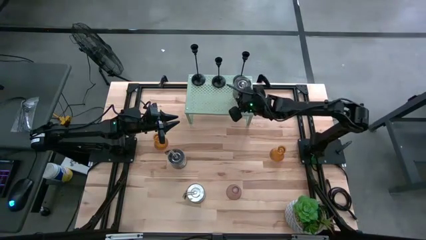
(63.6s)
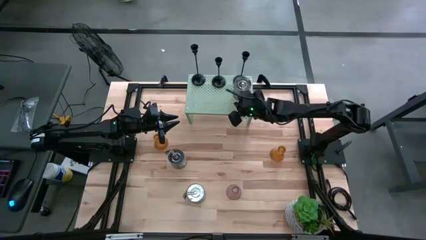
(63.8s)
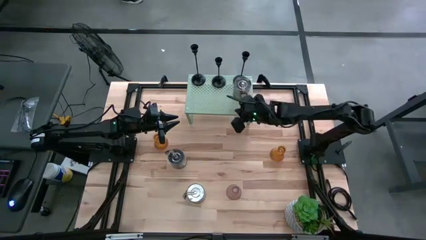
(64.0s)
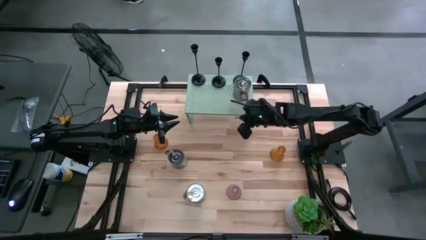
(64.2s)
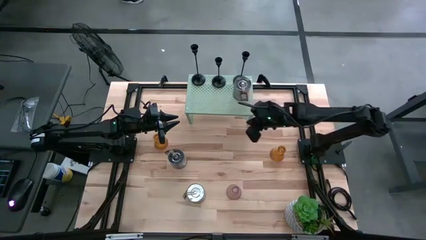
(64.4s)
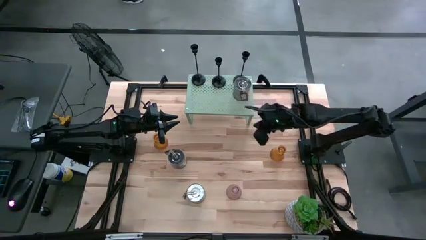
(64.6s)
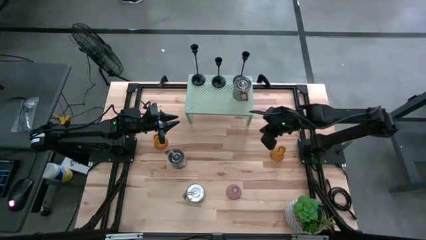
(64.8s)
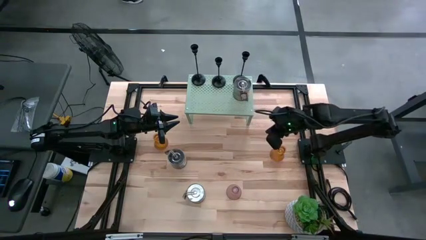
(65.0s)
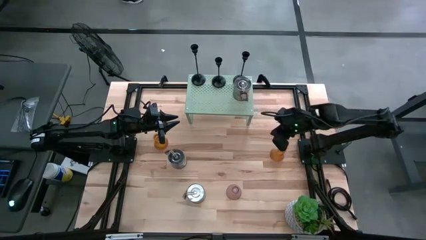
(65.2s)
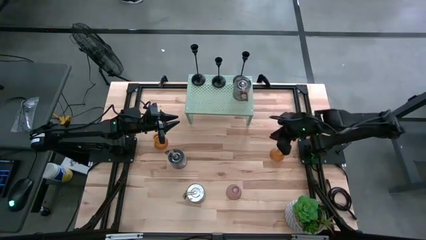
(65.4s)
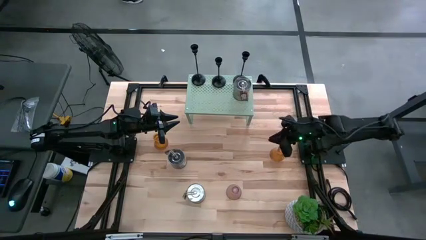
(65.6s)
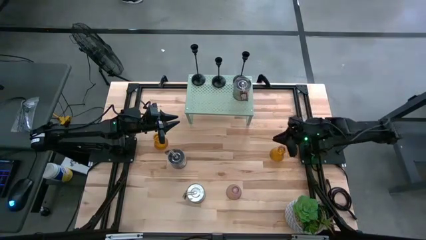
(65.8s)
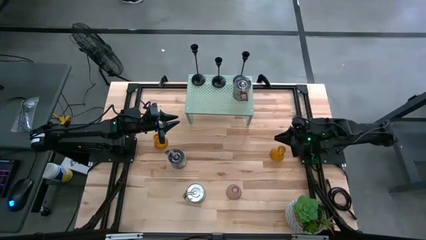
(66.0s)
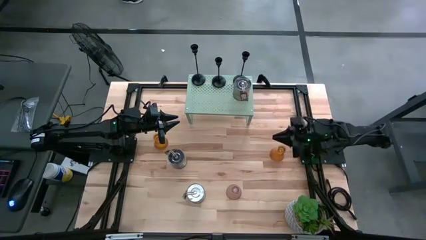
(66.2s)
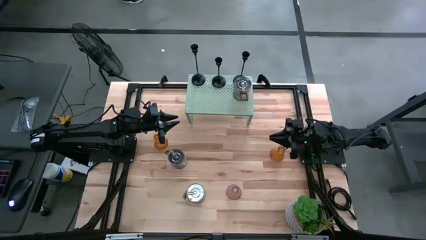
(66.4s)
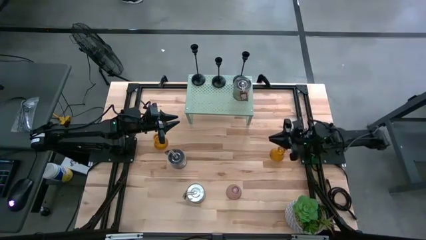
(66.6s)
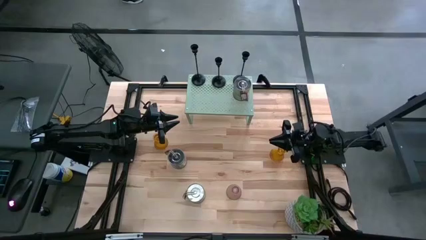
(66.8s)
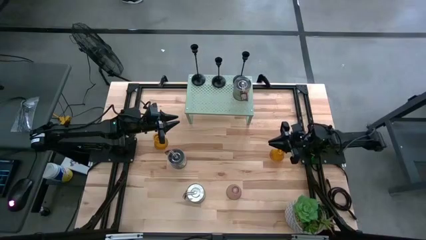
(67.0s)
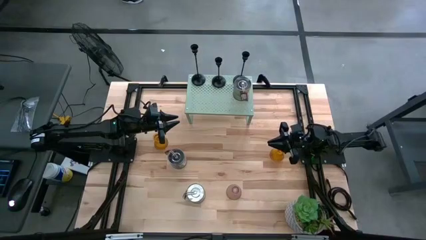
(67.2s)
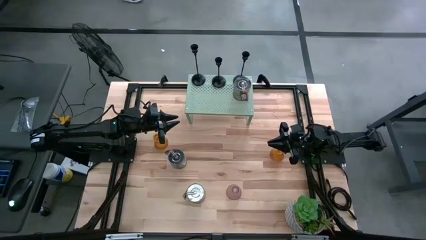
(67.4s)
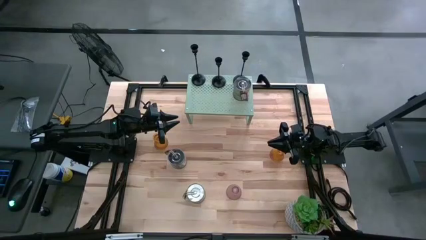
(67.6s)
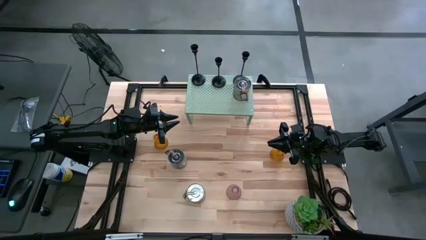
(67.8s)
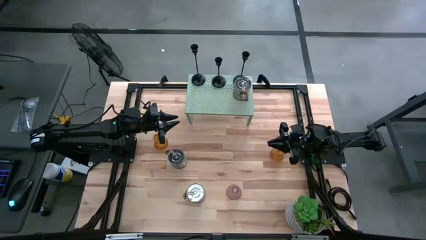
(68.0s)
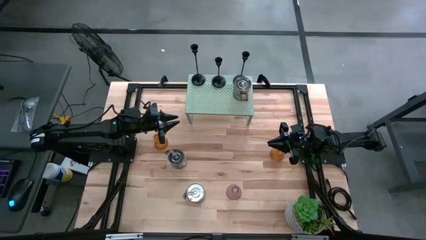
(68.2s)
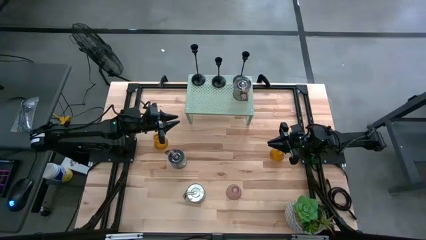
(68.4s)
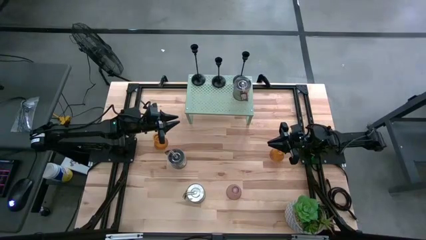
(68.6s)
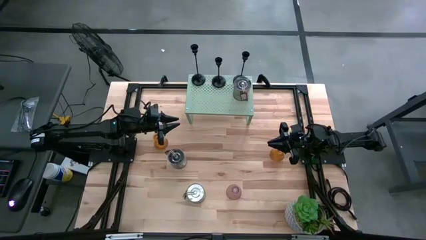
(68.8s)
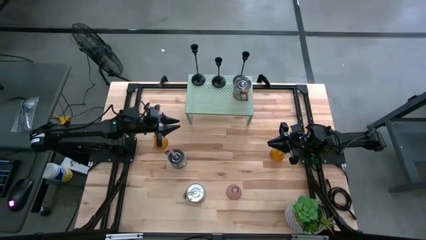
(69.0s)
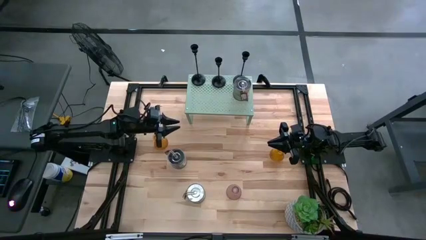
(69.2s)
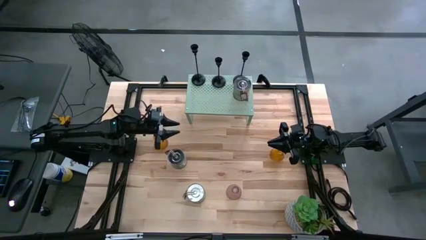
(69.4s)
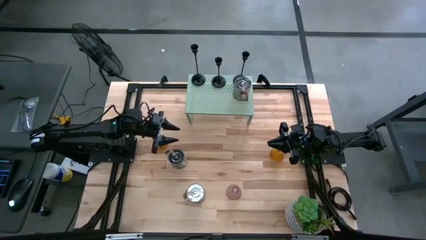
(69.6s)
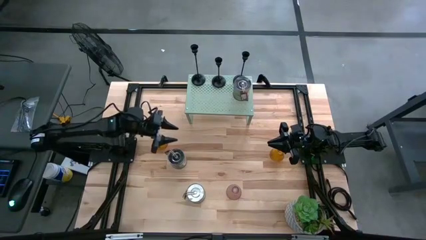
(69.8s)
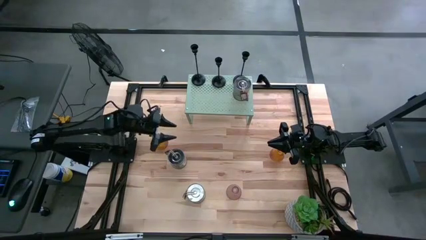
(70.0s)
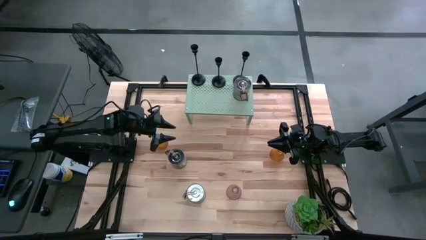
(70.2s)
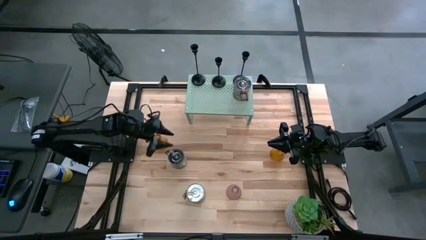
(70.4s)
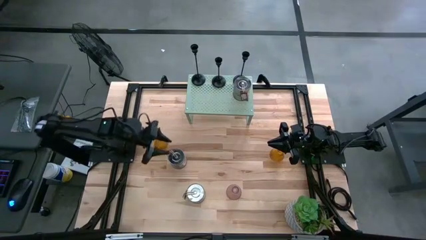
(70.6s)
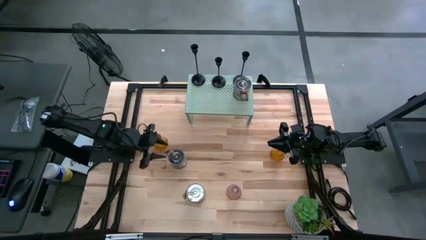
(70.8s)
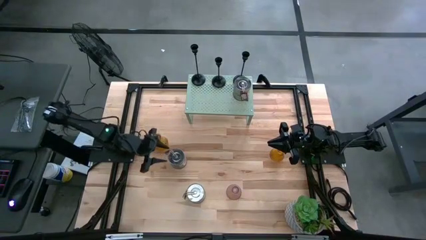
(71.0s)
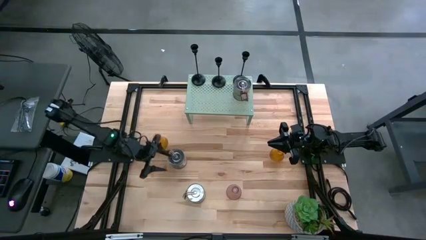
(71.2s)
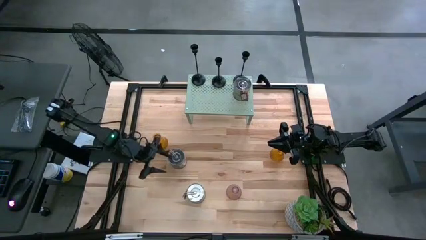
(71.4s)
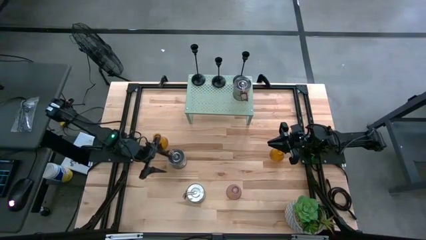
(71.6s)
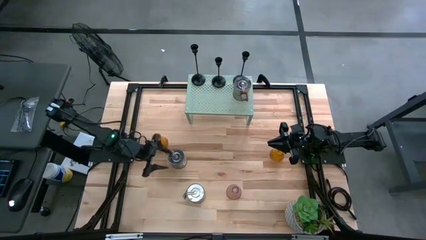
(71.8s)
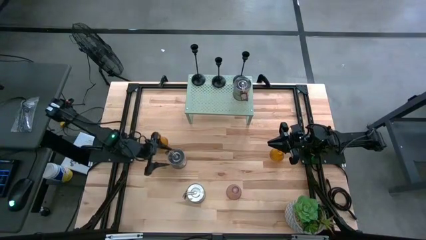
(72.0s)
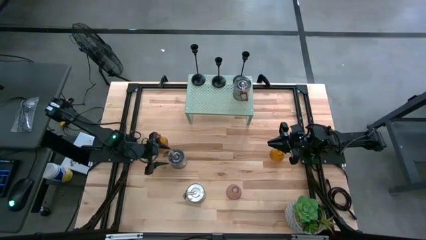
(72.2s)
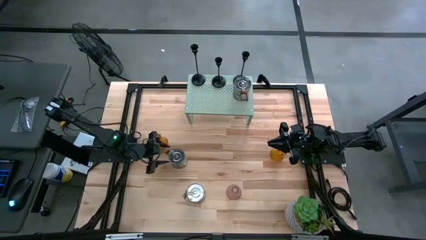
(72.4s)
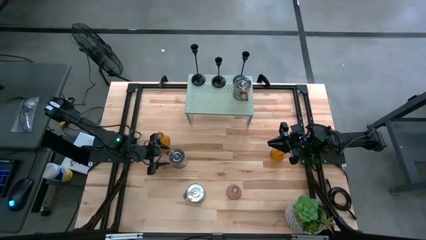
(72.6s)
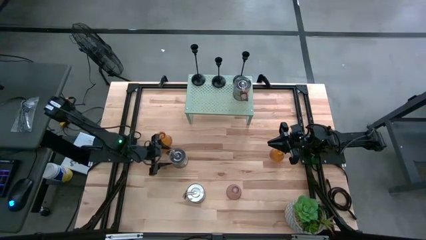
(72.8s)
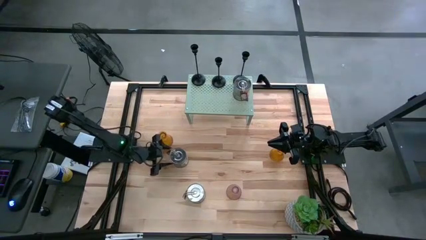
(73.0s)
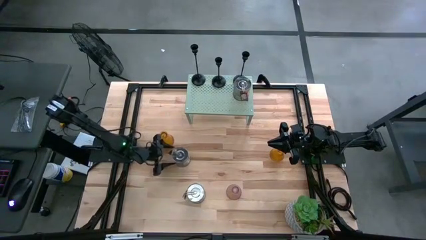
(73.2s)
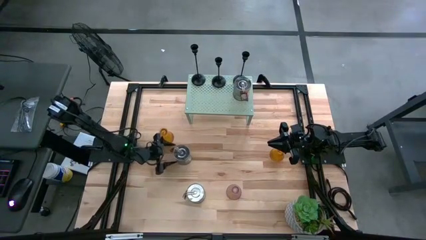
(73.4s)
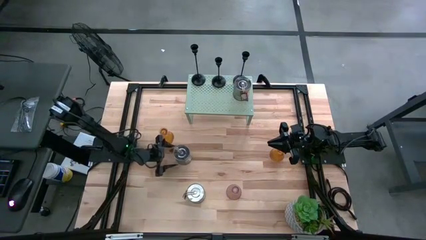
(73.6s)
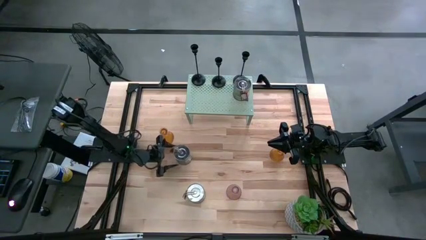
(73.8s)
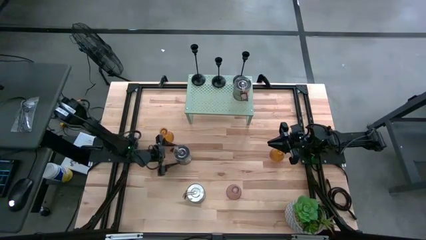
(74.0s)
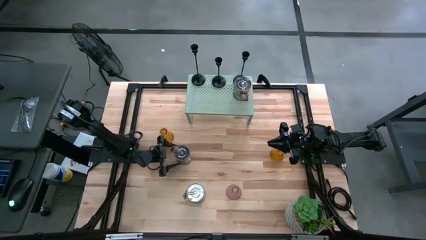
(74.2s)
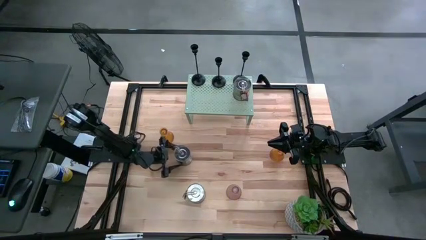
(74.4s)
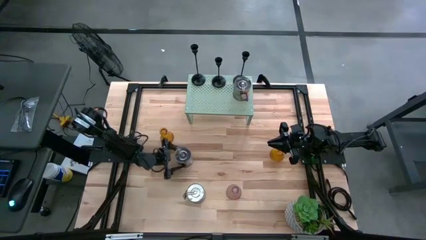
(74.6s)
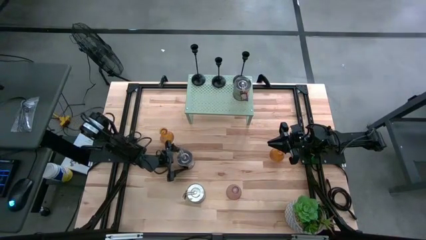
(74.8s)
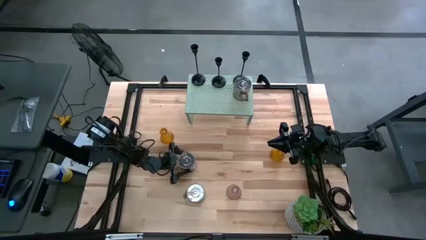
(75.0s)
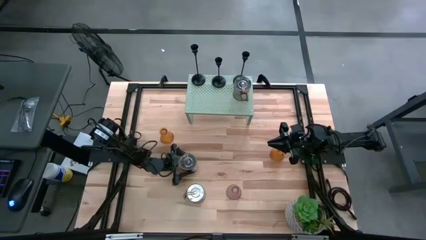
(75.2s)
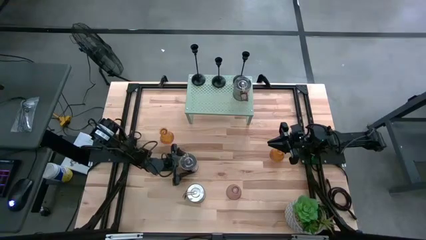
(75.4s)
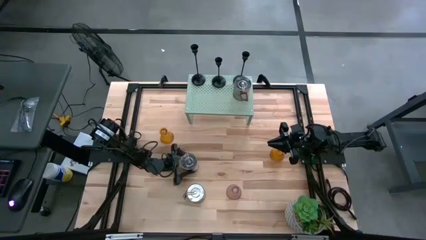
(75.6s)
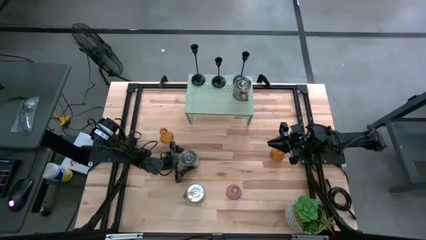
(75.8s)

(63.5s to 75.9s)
Task: Pick & Place candle stick holders
Put the top scented candle on the shelf

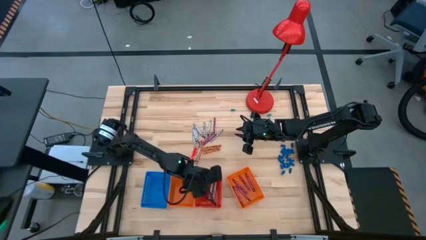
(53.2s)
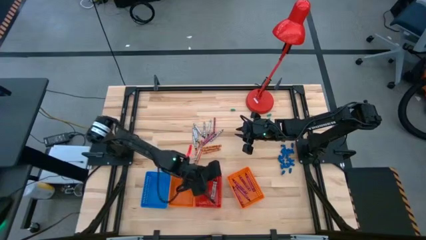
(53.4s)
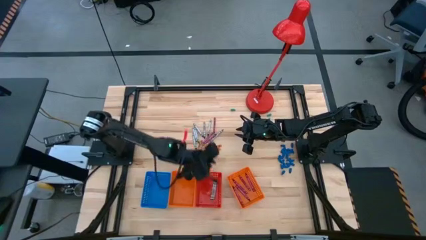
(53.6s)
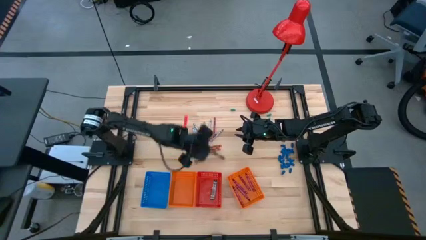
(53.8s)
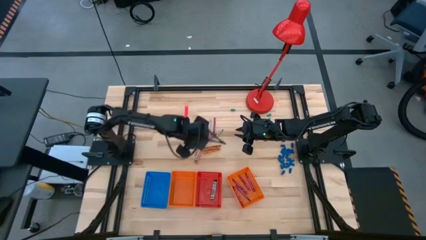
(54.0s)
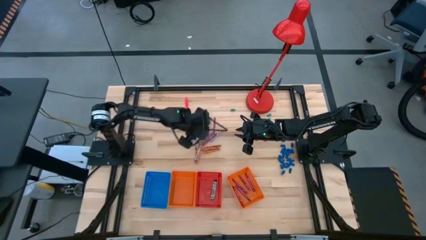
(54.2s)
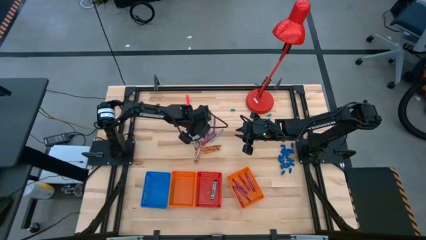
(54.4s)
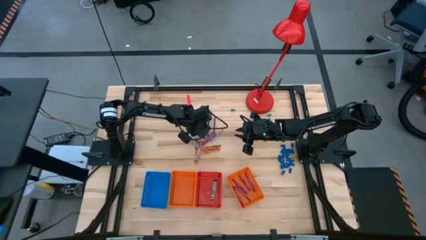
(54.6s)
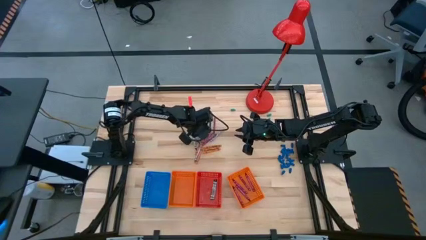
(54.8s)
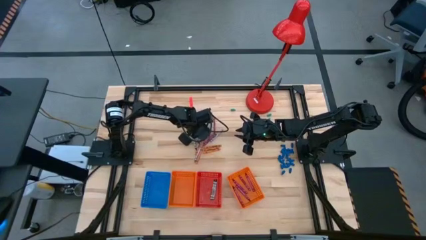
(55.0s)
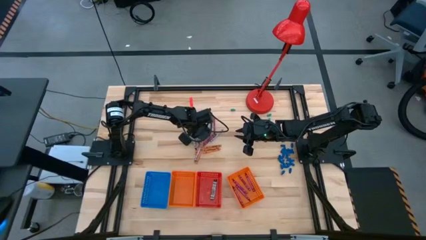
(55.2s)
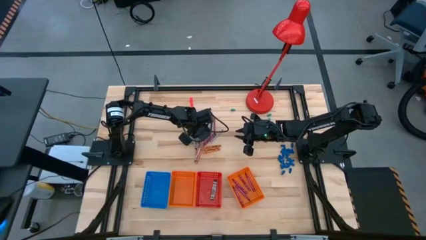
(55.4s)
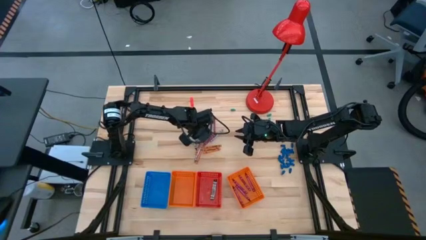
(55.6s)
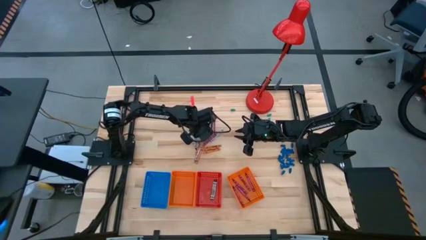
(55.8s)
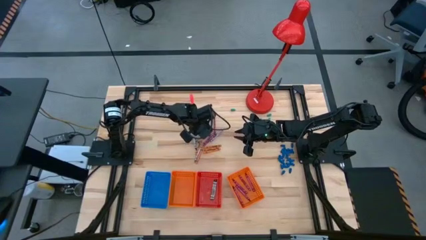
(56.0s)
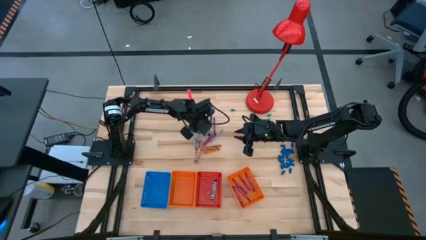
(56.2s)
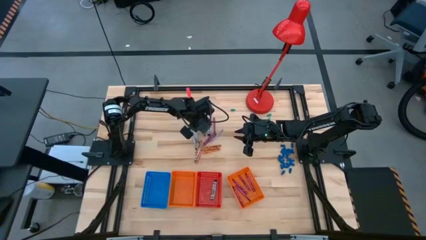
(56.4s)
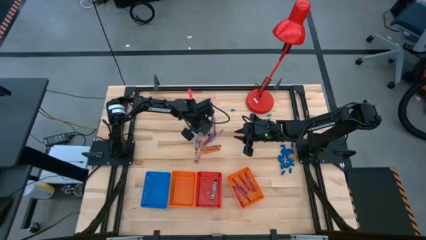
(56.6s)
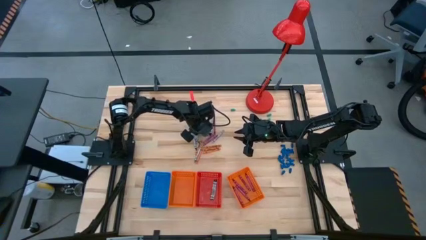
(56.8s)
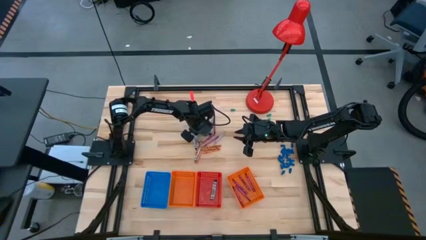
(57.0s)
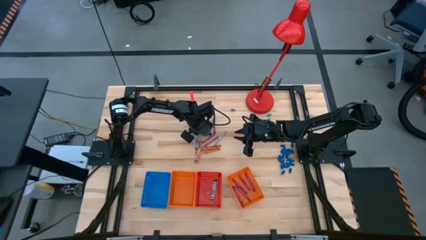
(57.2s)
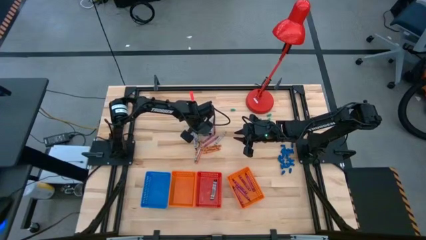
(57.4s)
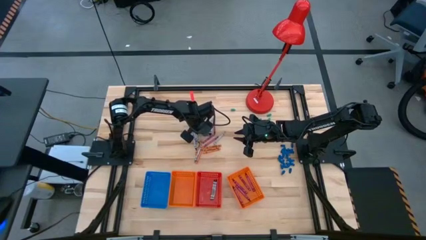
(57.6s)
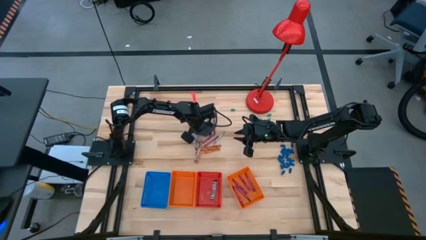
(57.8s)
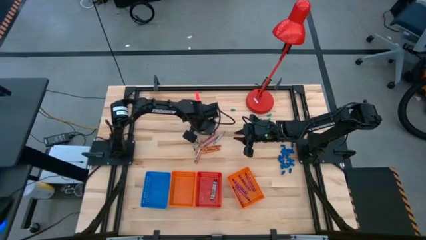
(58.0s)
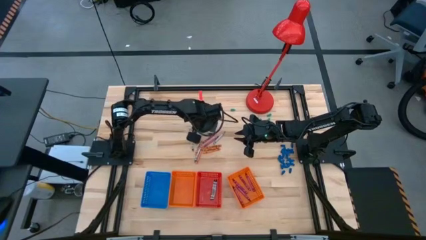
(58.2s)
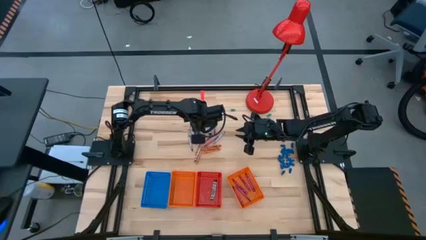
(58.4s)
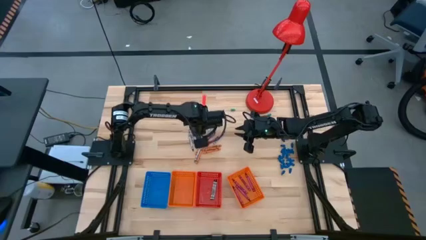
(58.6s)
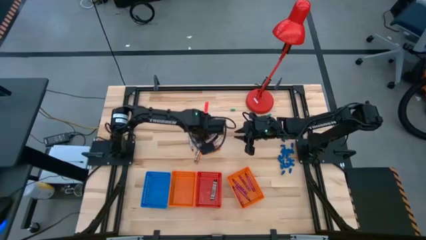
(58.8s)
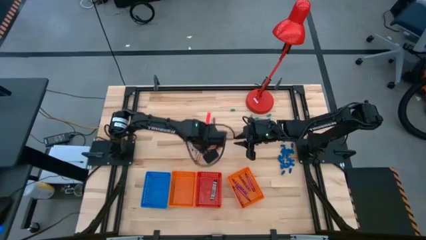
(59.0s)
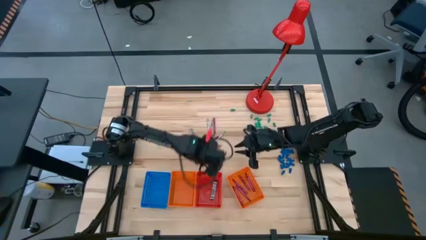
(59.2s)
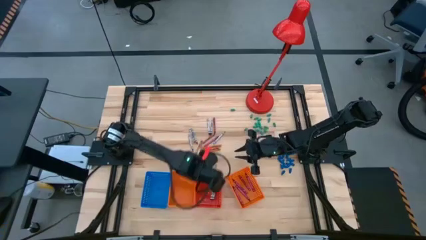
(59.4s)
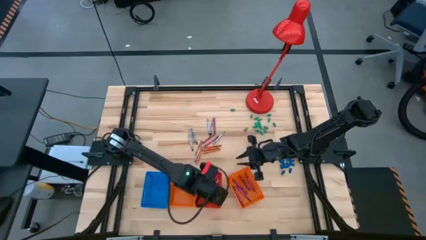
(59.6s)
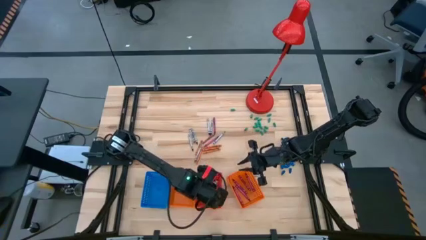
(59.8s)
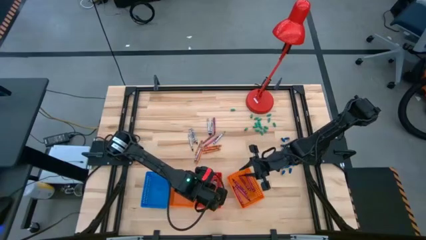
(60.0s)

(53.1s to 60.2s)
Task: Sort crayons
Put the black crayon into the red bin
